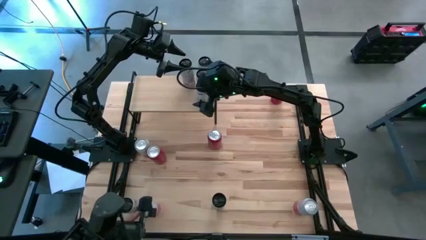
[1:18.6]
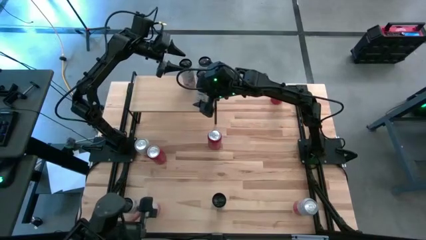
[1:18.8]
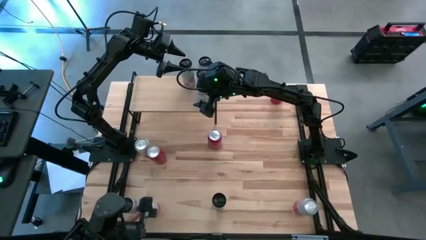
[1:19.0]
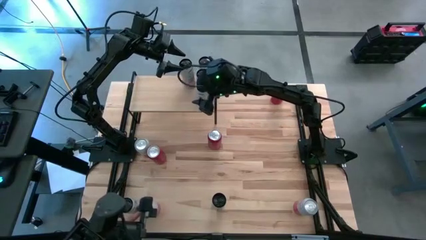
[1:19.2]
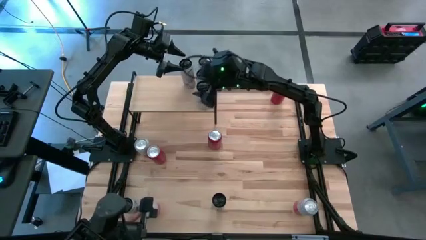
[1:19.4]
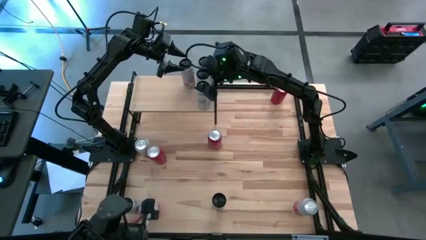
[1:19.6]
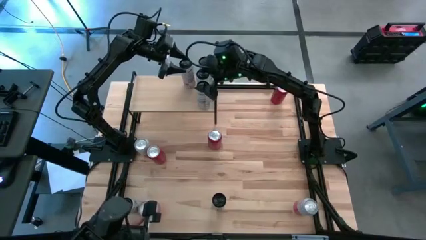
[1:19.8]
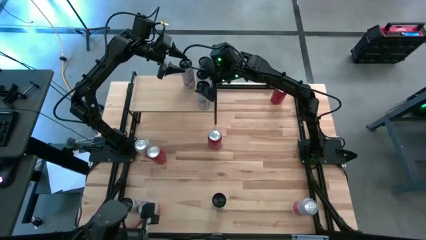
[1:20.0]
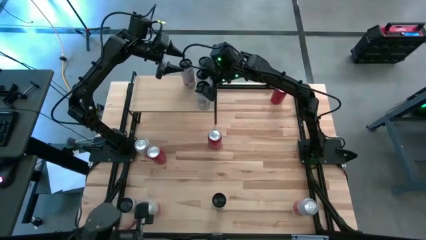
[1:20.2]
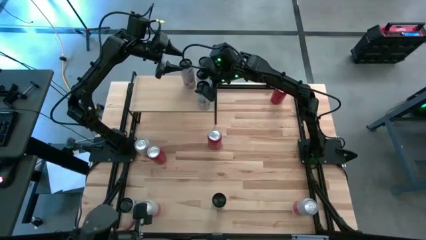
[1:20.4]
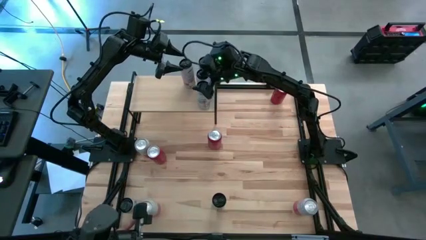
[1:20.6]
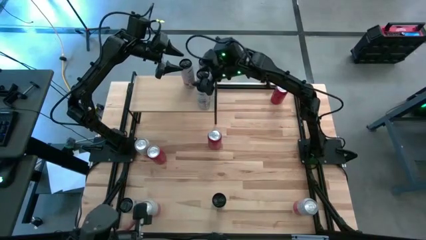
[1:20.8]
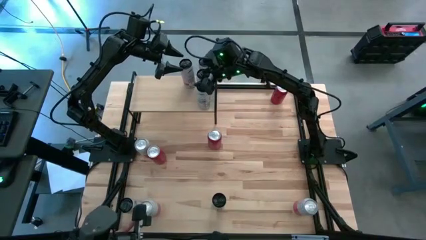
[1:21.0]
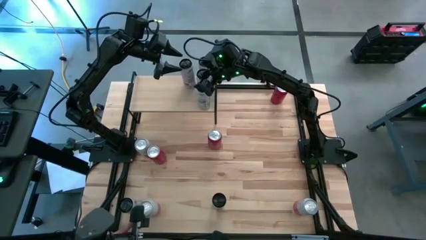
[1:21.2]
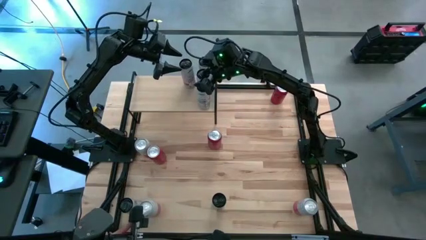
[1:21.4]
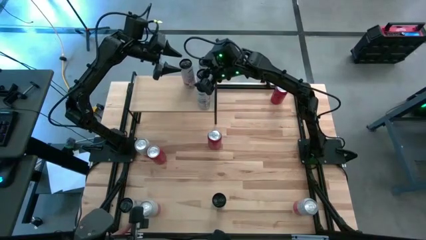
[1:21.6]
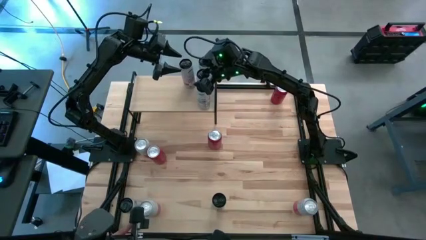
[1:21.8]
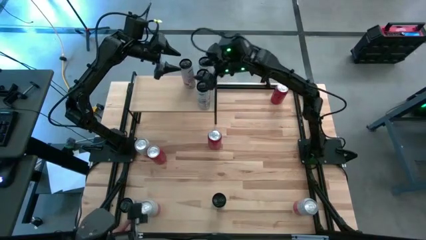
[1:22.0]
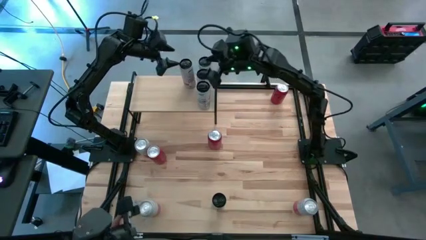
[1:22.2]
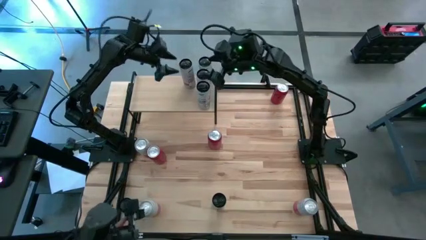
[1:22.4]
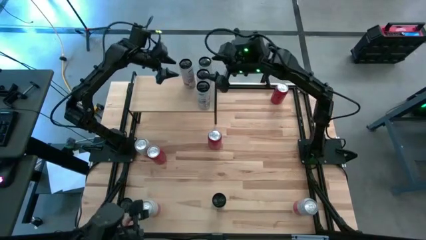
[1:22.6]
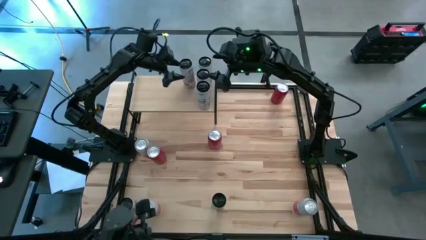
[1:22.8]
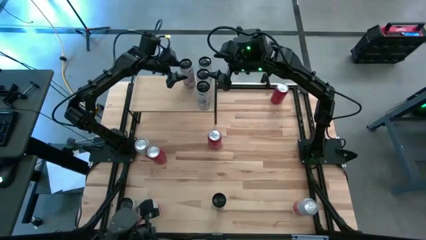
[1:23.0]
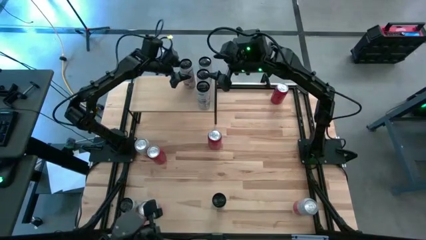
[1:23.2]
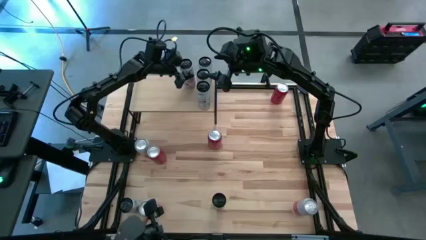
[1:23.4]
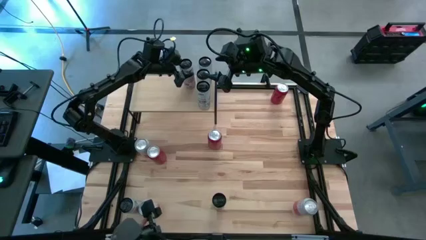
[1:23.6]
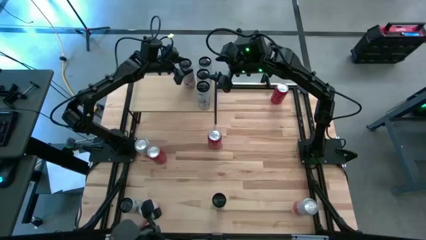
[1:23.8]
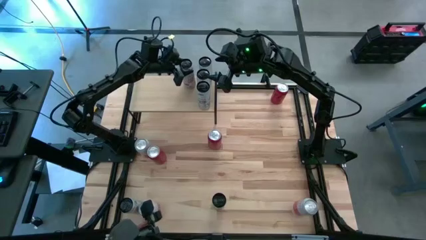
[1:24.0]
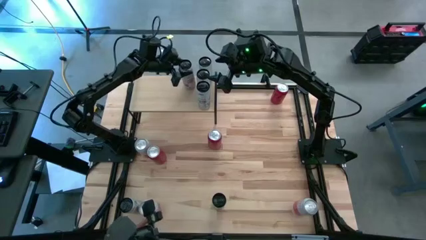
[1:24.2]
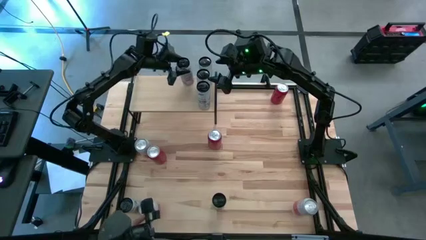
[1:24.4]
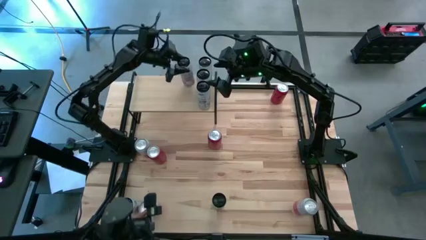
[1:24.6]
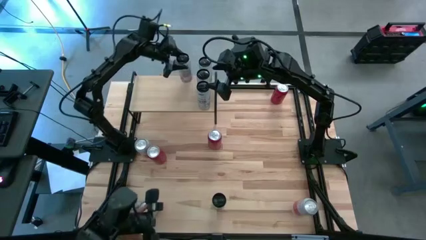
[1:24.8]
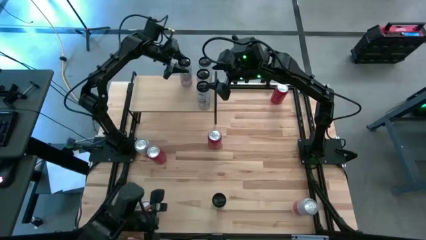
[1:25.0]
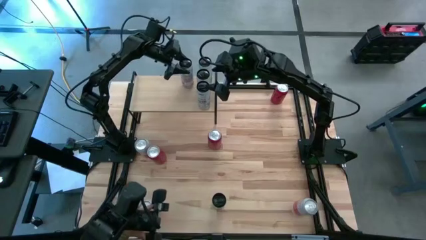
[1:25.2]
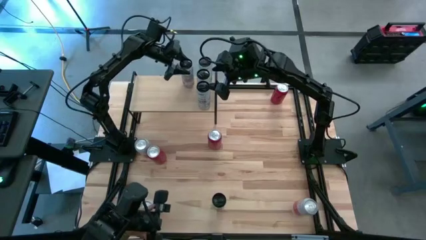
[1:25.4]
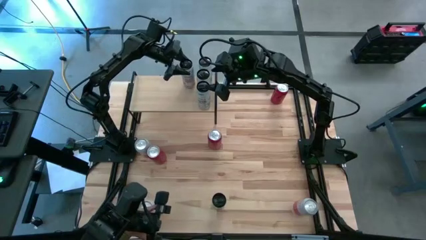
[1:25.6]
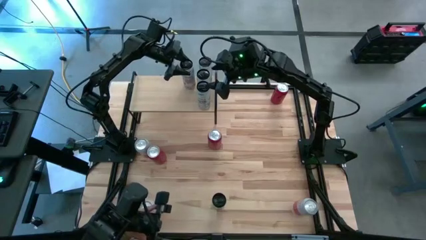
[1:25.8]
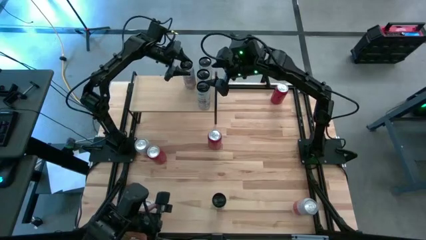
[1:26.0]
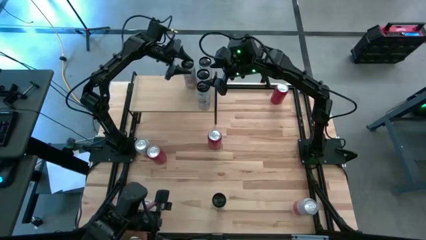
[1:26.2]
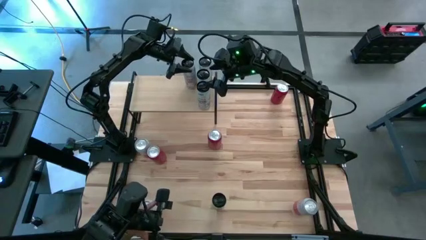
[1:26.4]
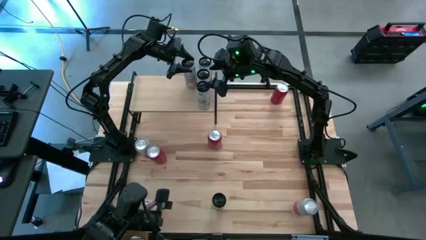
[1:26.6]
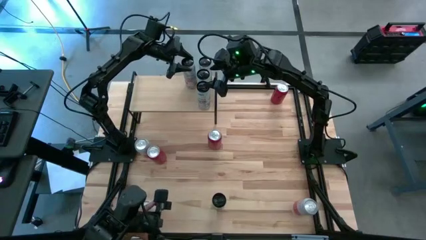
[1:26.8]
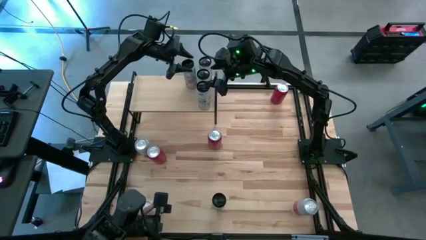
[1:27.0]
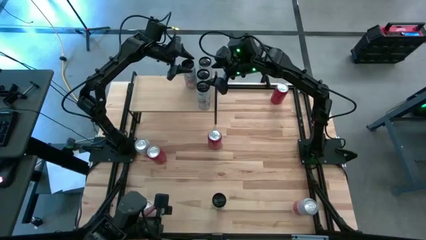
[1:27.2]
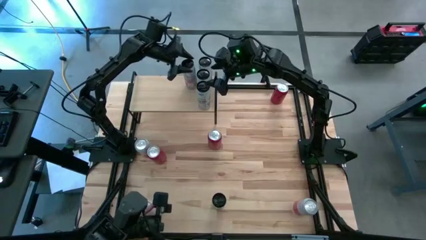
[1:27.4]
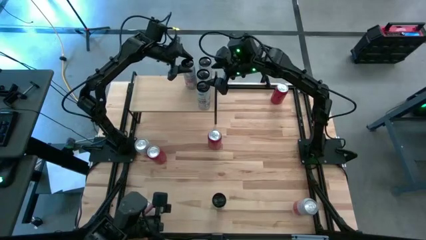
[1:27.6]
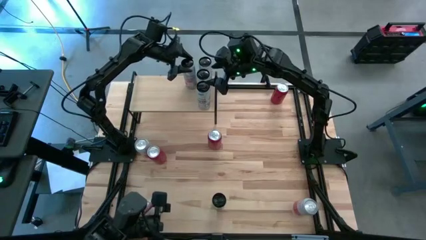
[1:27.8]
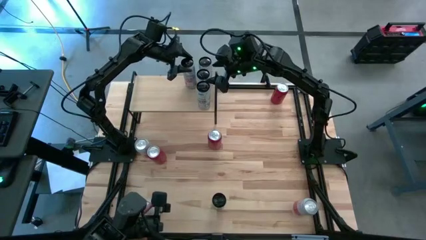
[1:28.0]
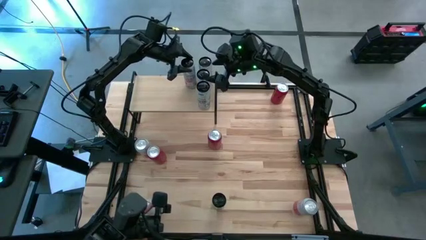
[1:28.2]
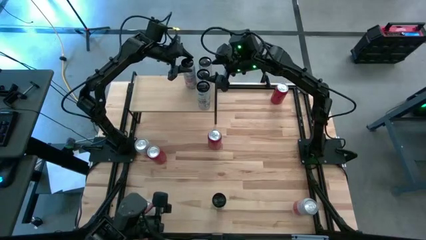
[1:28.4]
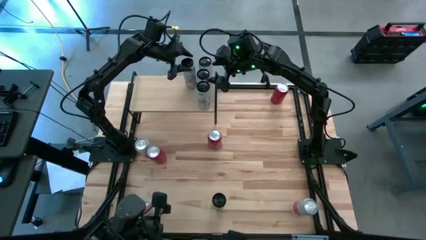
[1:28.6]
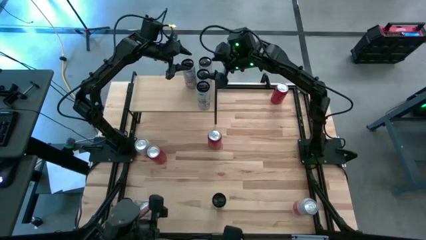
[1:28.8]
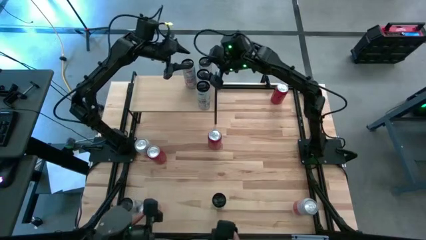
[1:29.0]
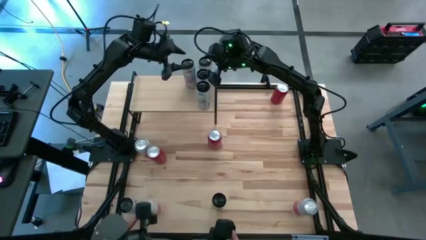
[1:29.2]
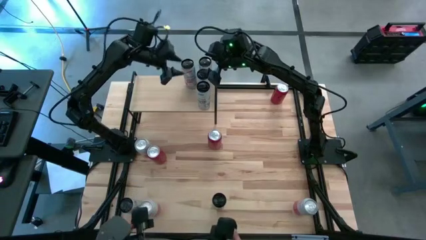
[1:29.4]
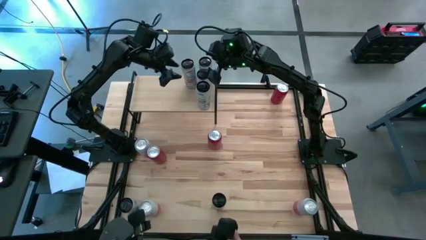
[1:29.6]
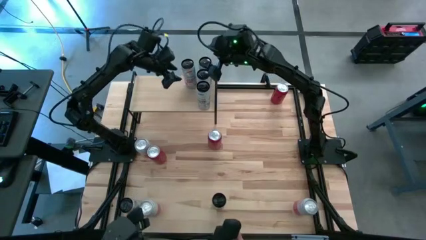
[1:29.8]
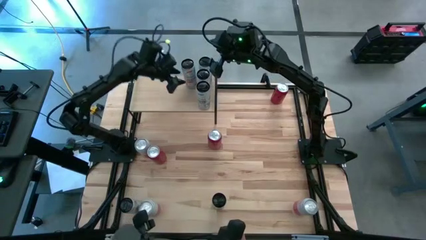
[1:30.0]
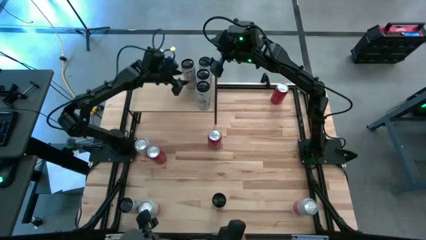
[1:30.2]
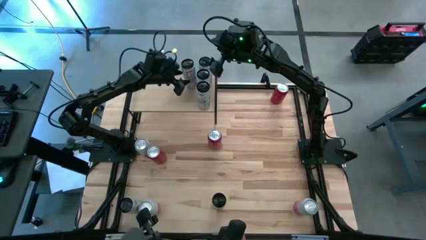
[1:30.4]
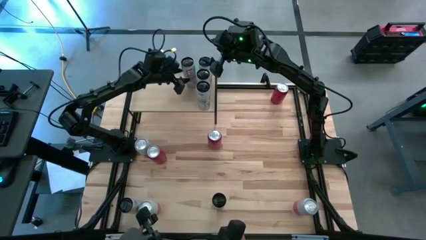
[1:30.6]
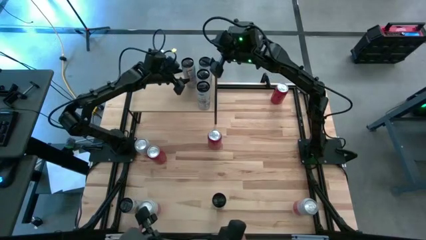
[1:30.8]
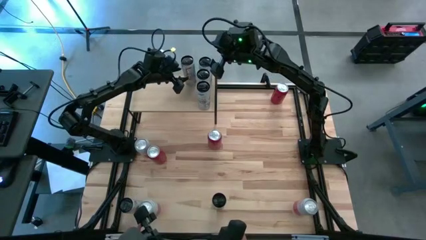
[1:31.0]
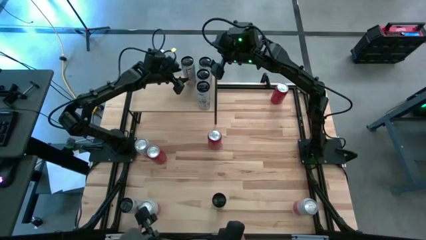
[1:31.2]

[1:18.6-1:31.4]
Task: Place canned beverage on shelf
Put the middle pink soda can on the shelf

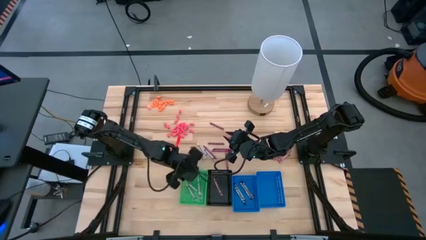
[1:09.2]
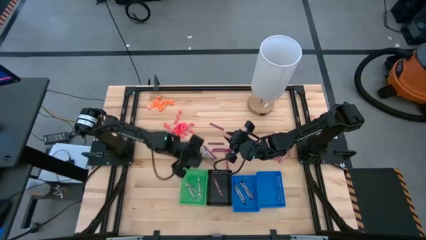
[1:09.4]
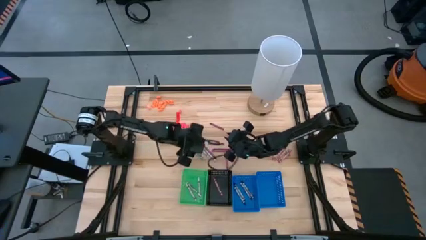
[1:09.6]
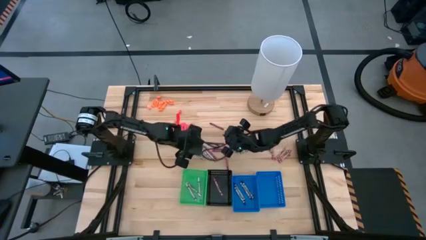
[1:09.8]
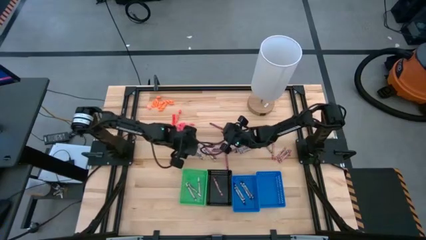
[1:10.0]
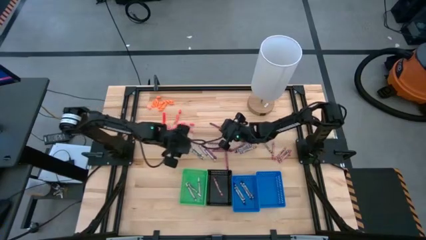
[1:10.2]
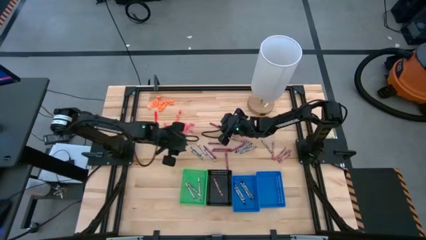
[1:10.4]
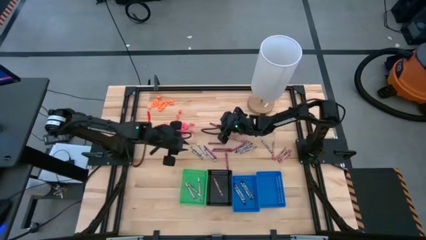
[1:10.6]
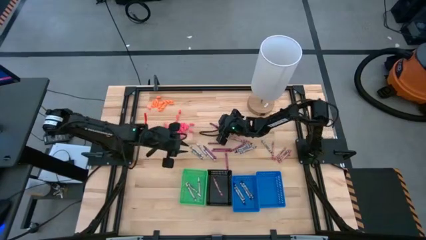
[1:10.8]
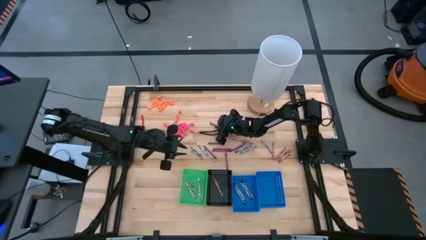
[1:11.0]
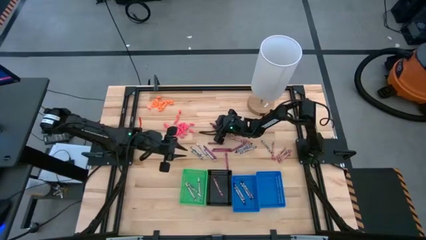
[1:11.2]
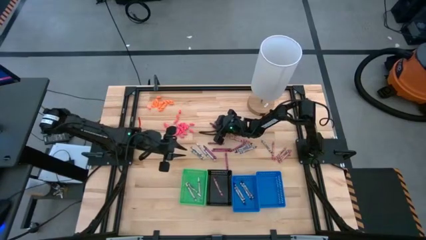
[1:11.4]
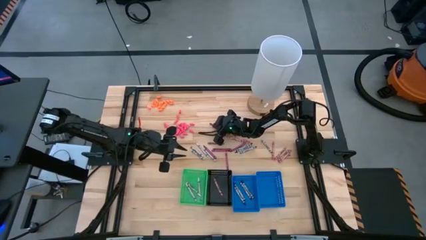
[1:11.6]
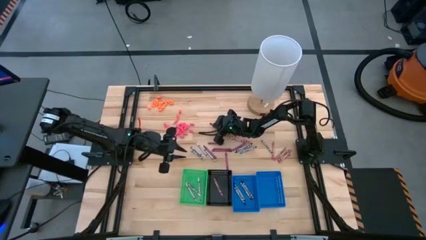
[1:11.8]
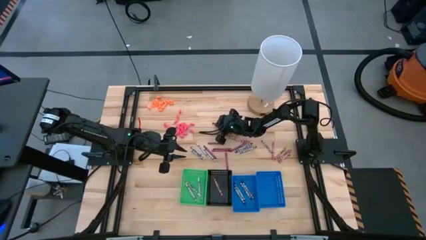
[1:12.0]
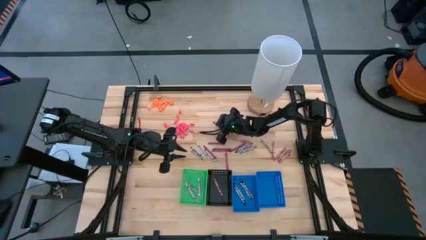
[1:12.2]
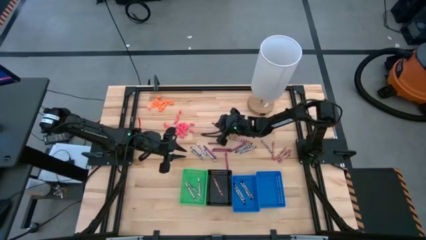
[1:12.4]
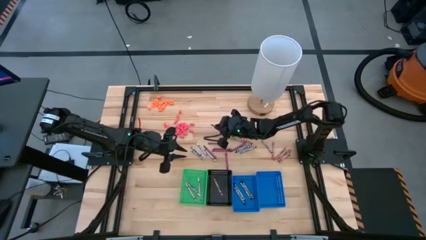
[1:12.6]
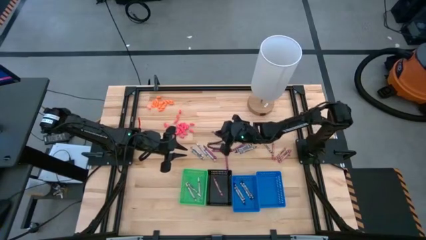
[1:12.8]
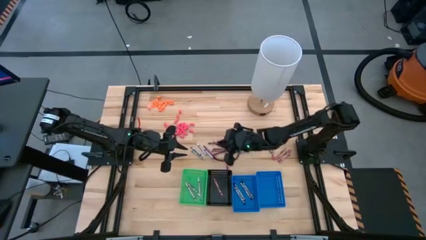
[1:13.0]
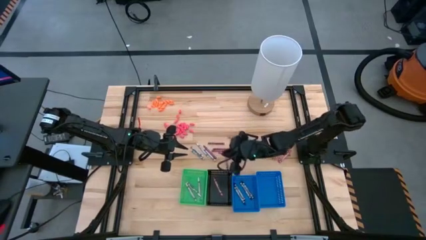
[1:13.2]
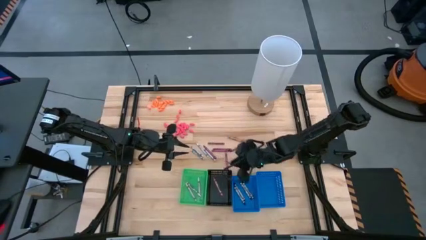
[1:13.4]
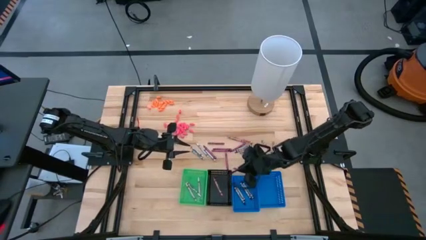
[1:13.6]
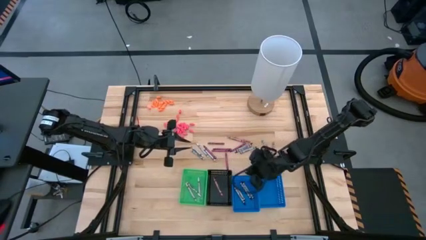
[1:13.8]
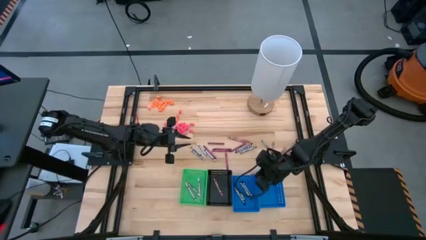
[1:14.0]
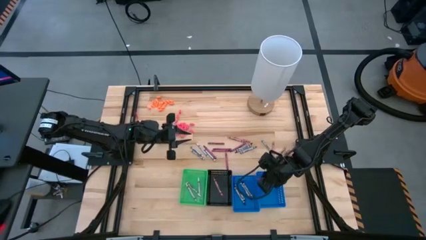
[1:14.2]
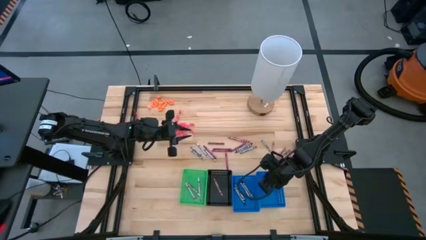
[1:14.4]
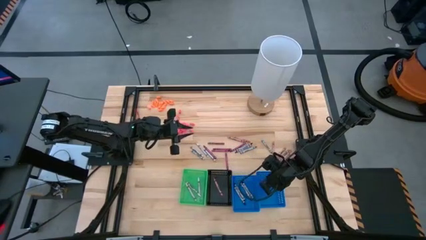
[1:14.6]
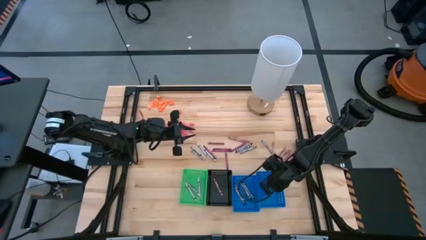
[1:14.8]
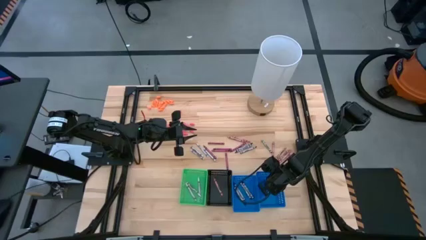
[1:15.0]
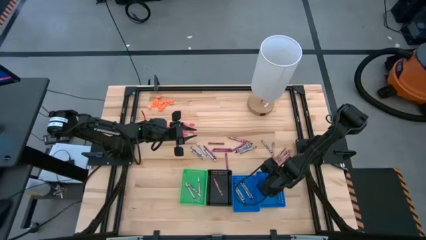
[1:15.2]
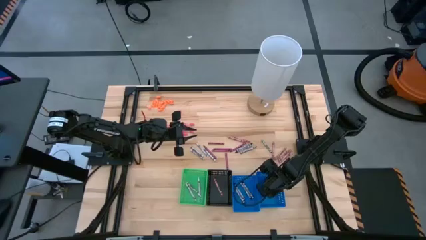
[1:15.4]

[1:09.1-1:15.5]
Task: Sort crayons
Put the red crayon into the right blue bin
